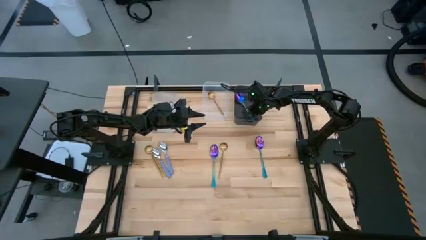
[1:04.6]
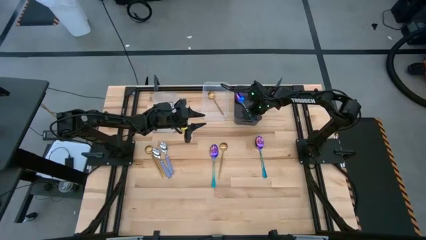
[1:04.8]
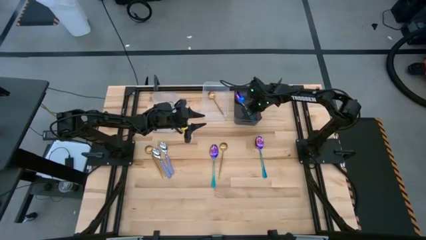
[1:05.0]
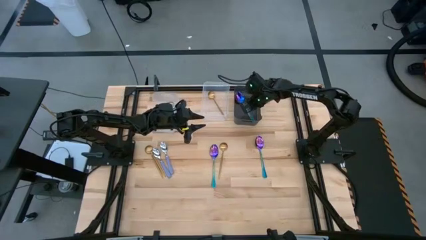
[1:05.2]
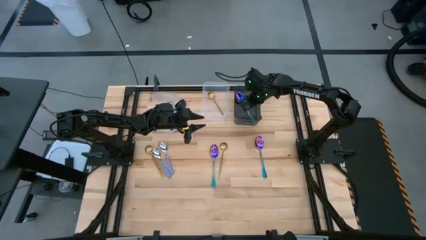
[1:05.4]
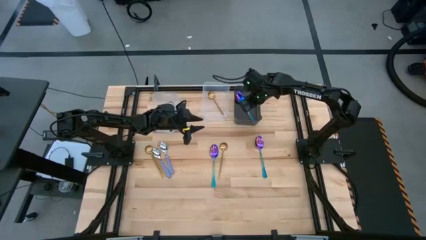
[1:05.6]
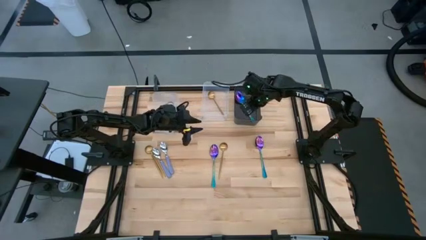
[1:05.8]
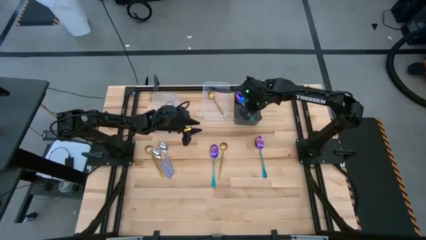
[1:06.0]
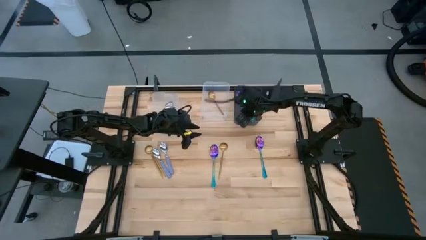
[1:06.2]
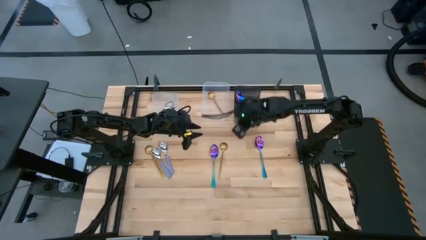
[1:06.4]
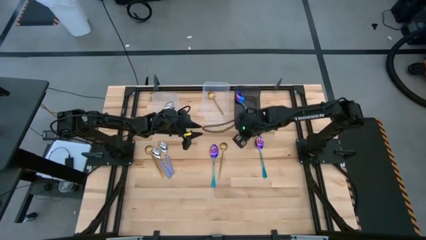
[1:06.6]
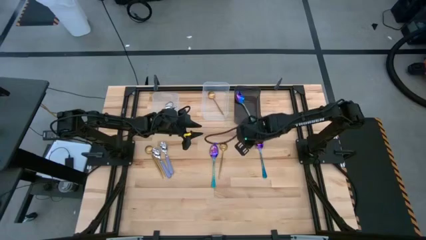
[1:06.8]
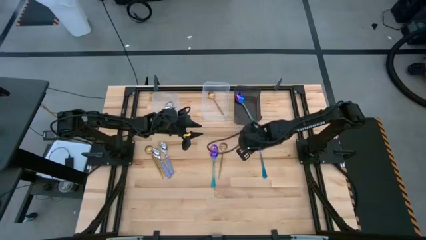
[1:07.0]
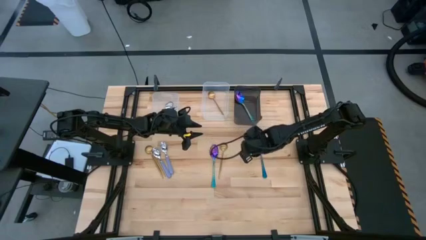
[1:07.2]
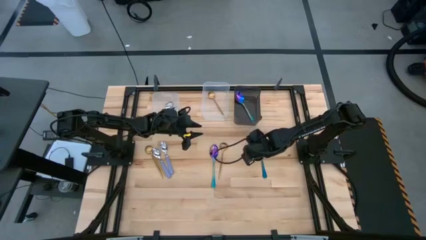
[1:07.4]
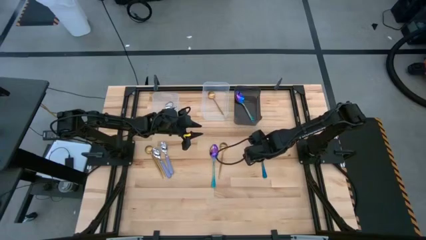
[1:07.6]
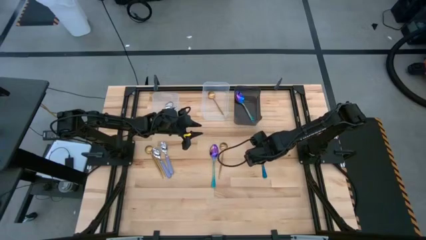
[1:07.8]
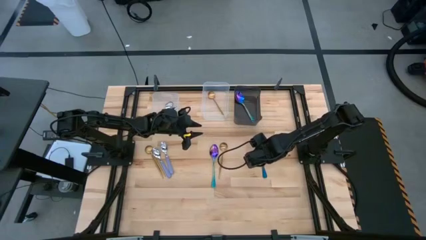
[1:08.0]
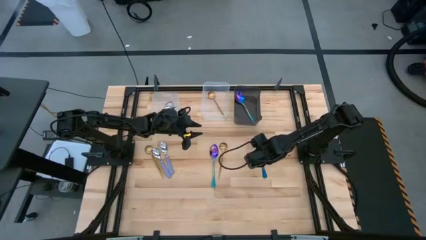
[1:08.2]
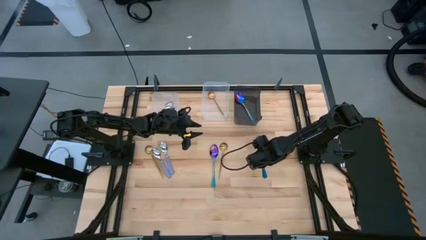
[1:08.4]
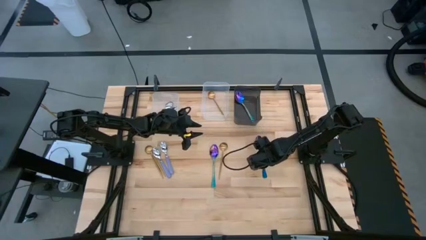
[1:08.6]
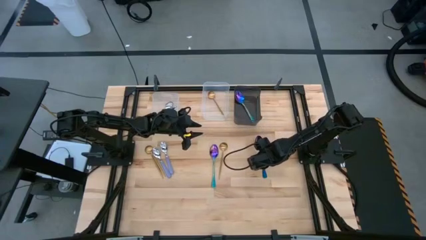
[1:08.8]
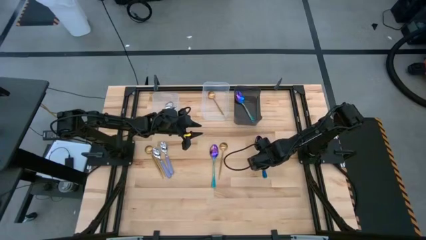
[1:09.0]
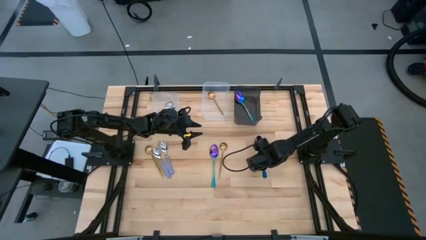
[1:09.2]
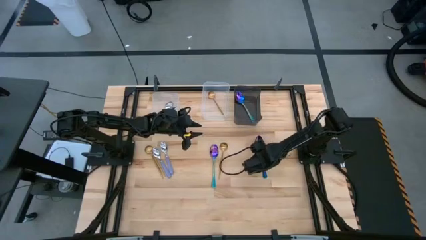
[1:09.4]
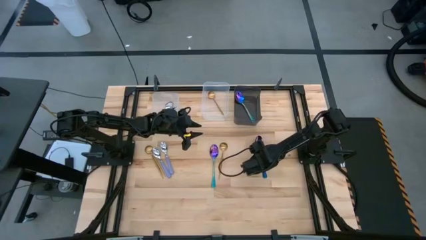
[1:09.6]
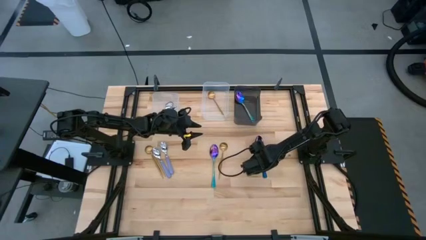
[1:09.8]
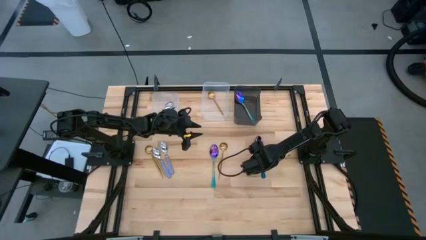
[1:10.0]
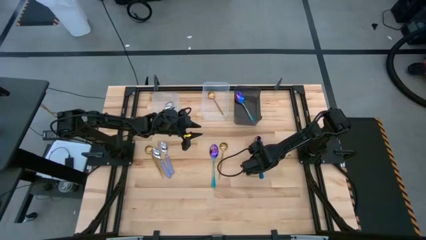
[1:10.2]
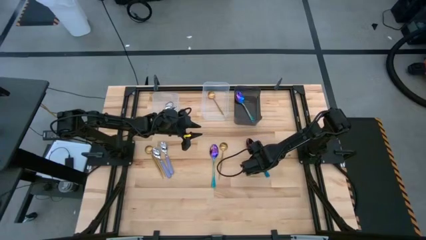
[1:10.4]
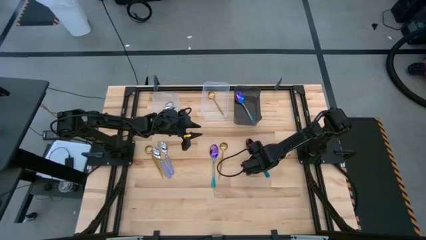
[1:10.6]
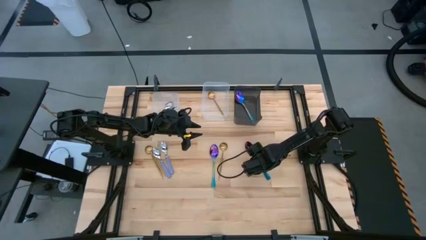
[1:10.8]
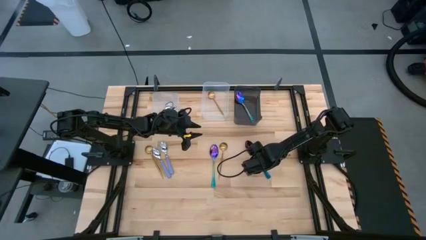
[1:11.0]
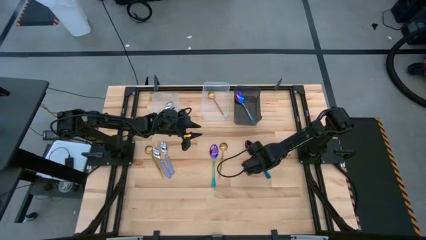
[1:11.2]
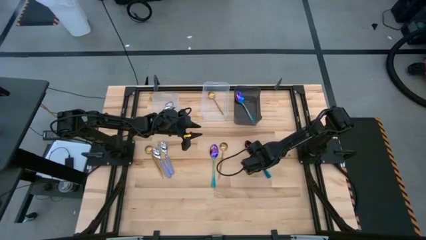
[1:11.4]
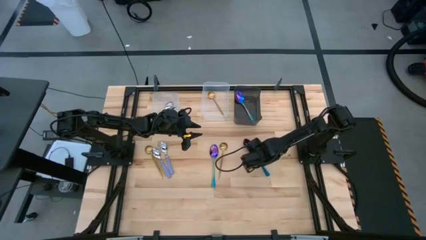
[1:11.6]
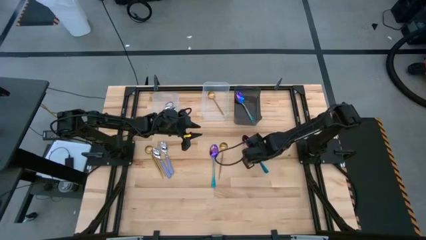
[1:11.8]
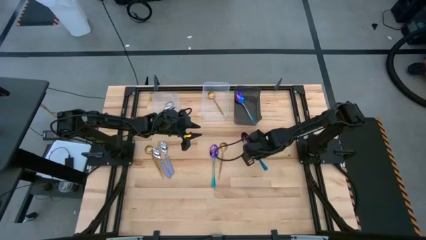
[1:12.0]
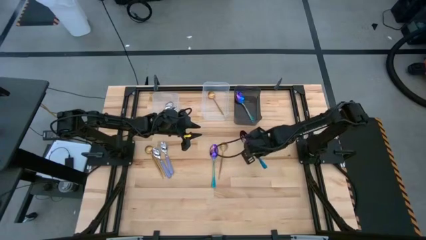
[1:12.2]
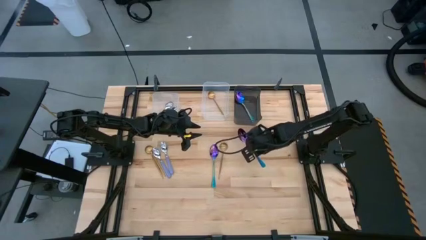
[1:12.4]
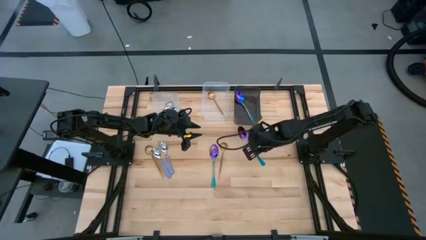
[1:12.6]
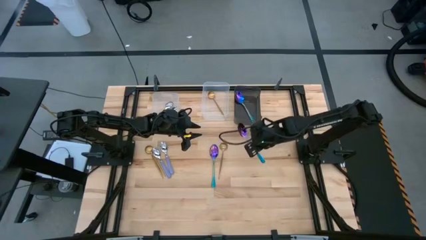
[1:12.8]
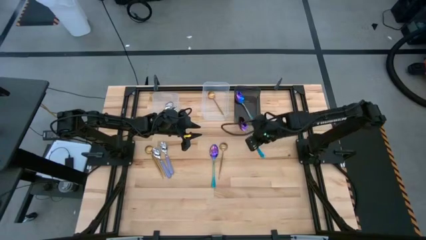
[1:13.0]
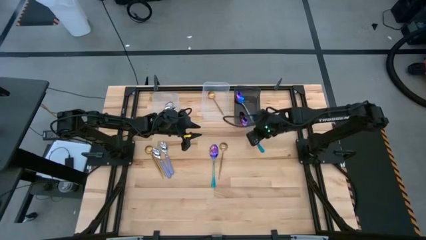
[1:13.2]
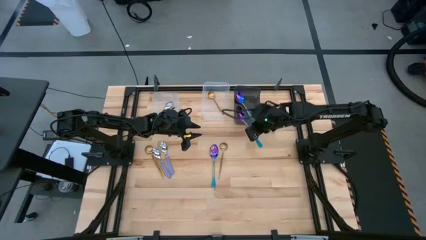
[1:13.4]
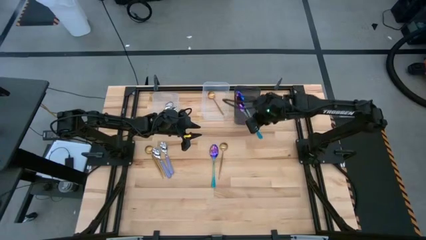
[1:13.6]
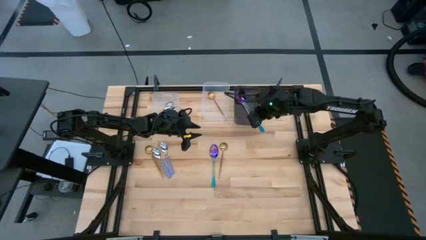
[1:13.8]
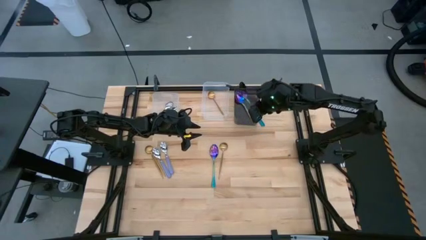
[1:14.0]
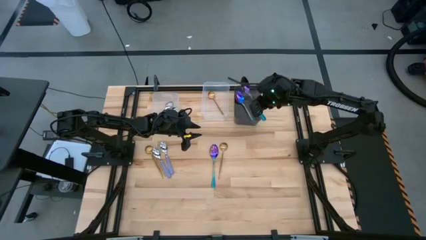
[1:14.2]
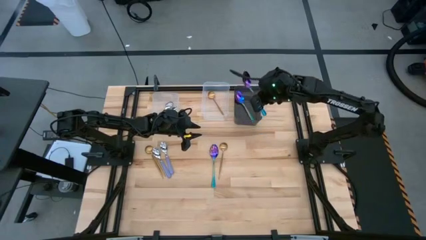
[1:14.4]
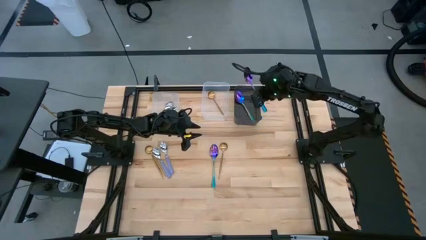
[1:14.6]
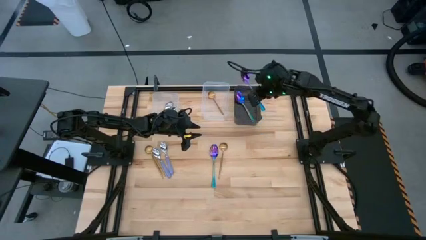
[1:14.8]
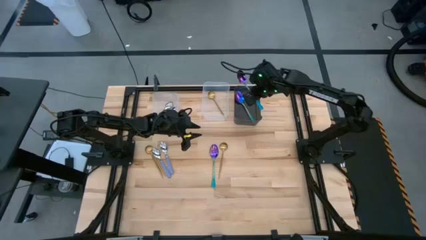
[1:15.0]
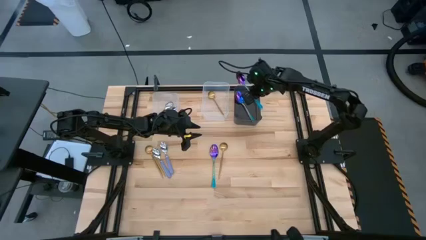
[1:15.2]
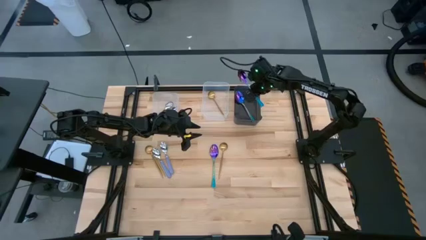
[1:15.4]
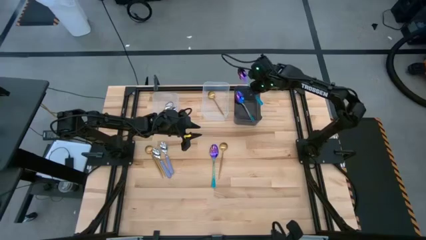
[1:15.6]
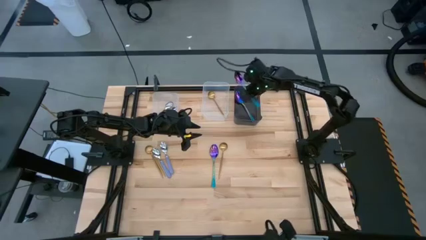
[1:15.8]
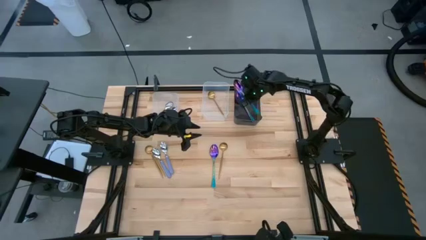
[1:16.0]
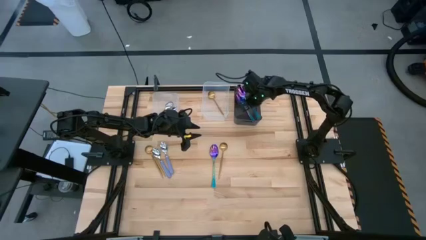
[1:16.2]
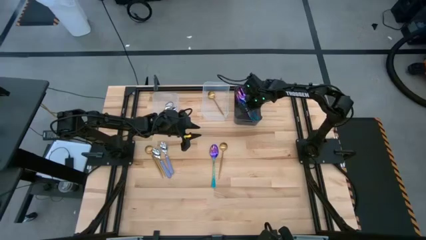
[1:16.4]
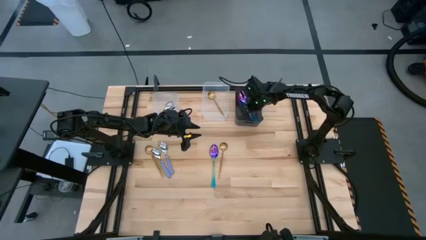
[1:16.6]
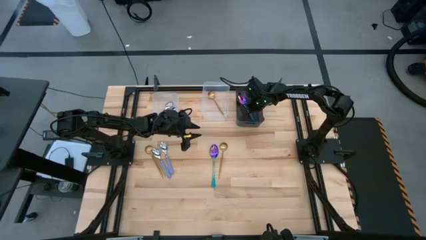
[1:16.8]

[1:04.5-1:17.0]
Task: Sort silverware by color (type)
Put the blue spoon into the black bin

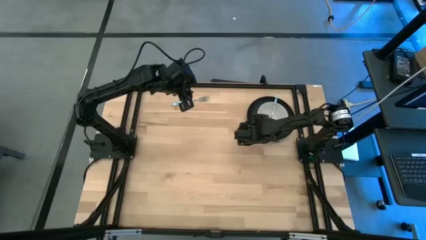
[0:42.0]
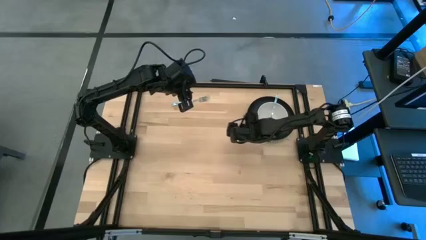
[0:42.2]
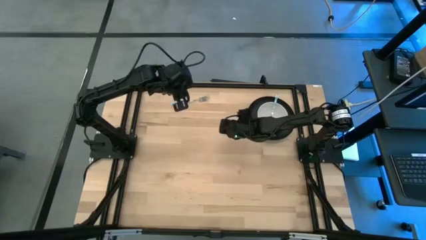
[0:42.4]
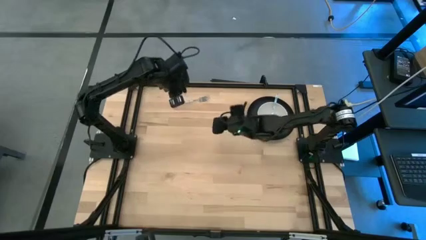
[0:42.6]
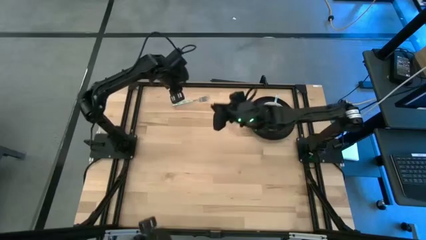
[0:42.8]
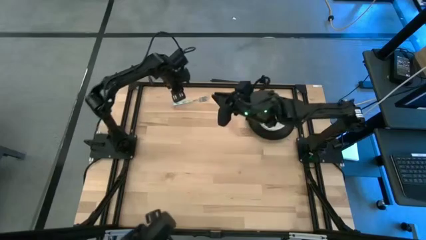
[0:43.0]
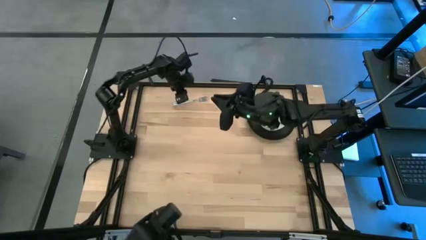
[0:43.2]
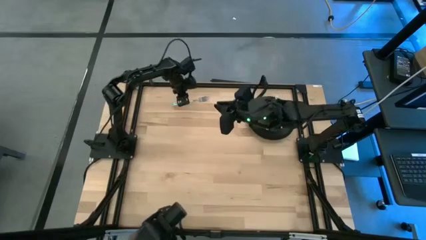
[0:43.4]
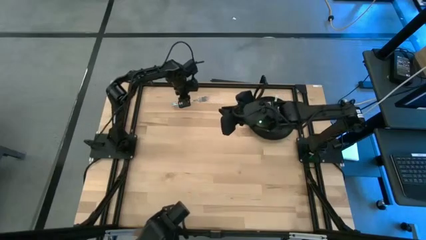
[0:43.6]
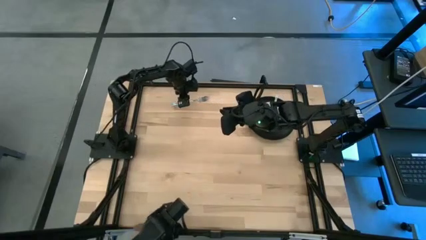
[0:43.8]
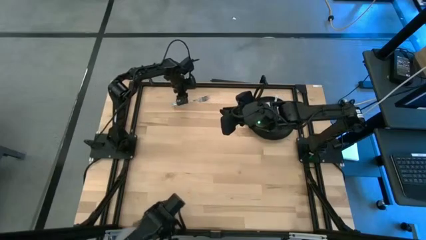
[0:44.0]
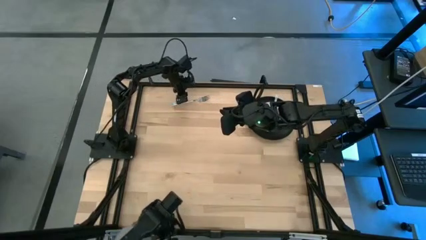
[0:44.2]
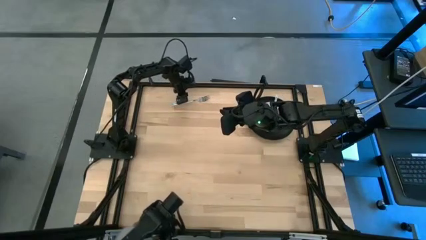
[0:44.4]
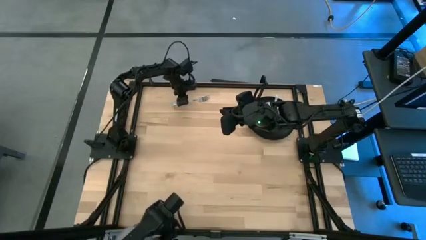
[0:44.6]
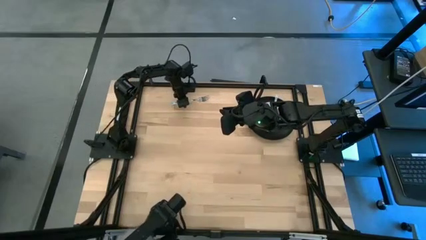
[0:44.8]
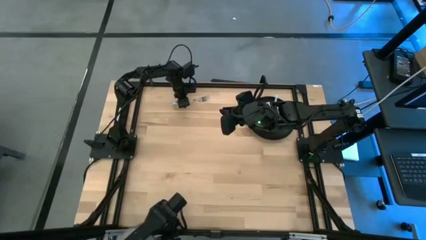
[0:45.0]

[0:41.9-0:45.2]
Task: Set table place
Put the blue fork on the middle left side of the table
